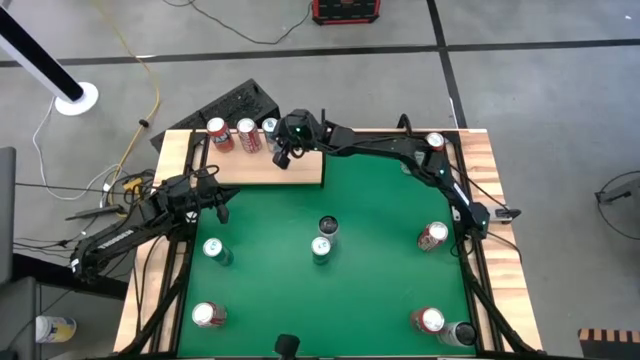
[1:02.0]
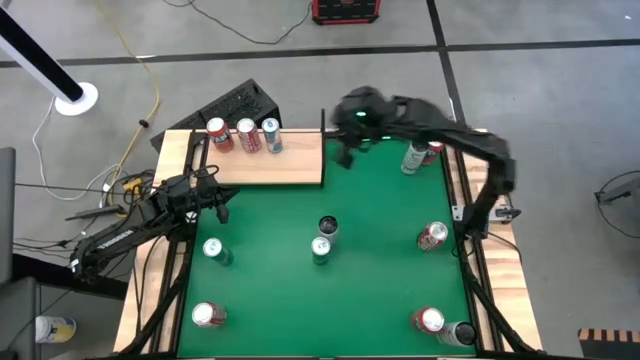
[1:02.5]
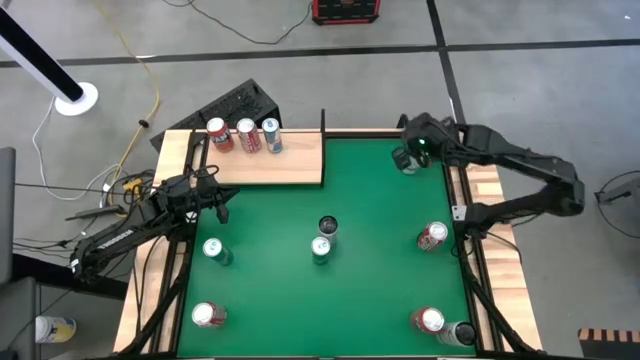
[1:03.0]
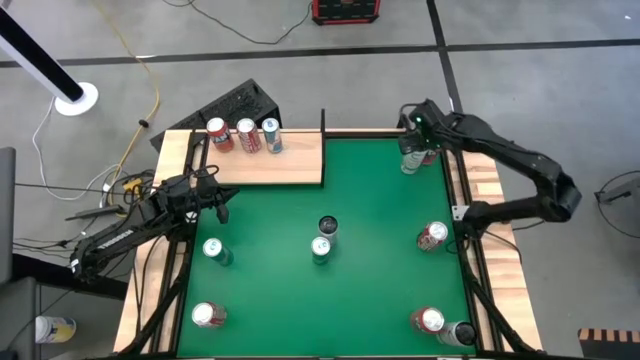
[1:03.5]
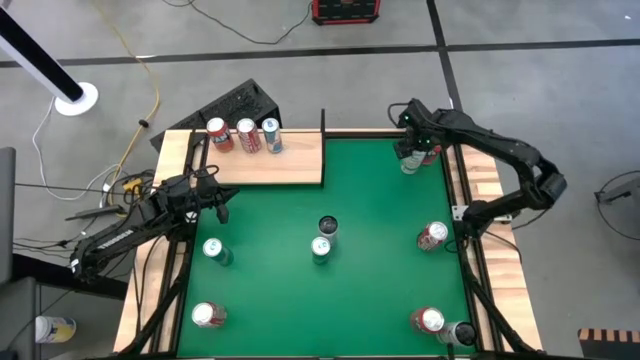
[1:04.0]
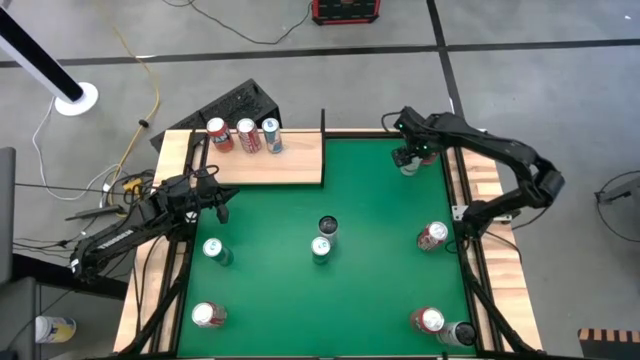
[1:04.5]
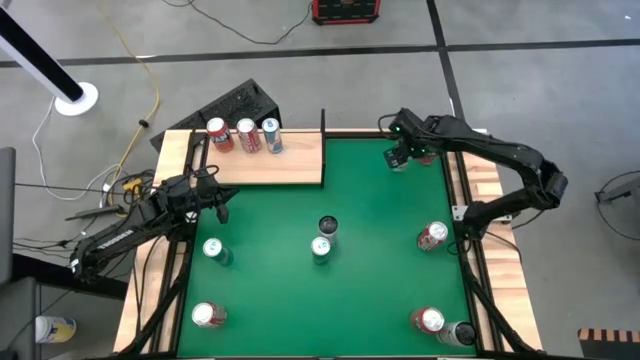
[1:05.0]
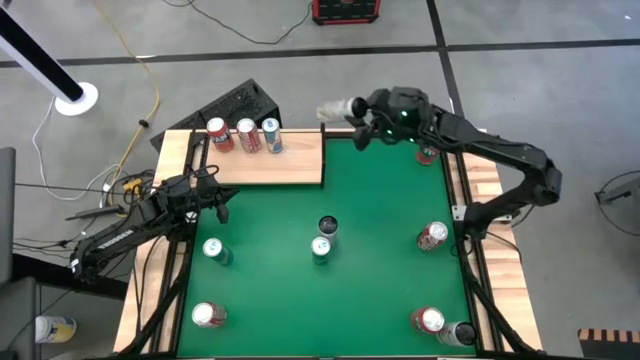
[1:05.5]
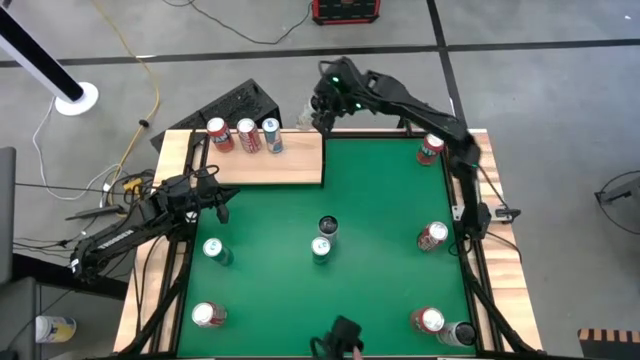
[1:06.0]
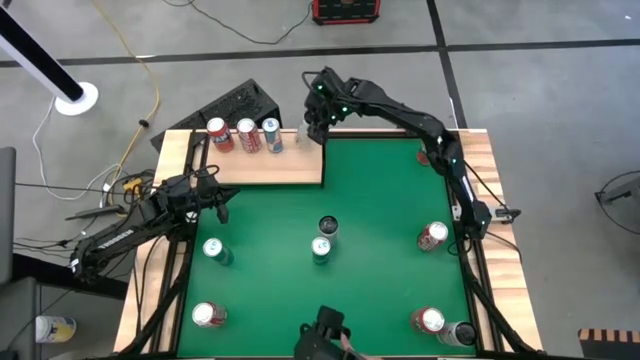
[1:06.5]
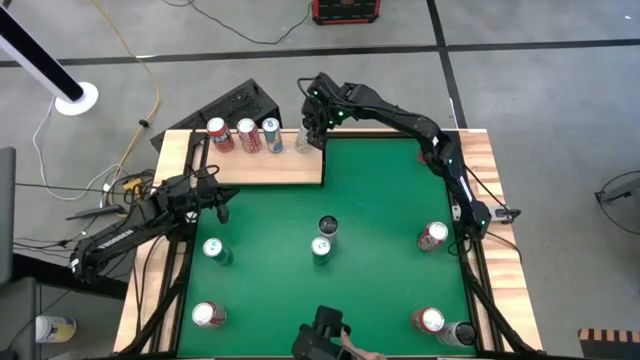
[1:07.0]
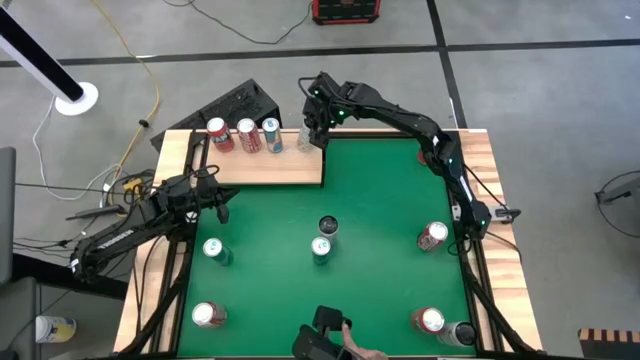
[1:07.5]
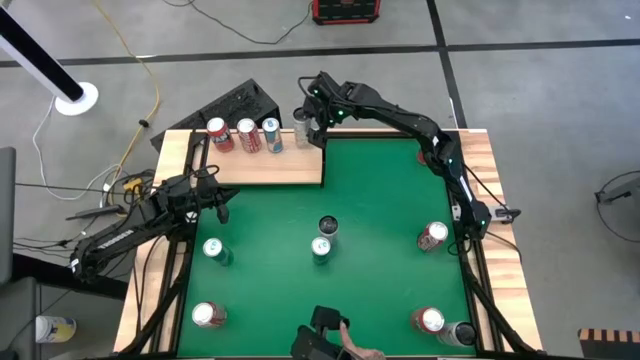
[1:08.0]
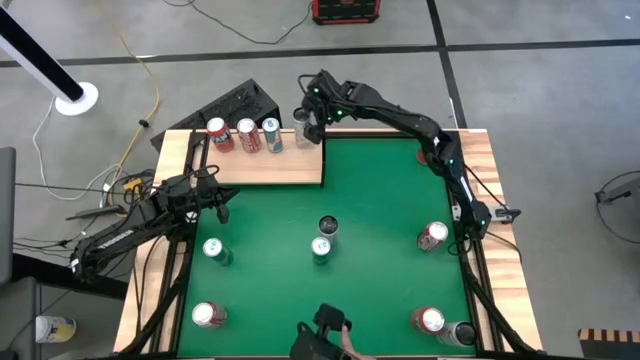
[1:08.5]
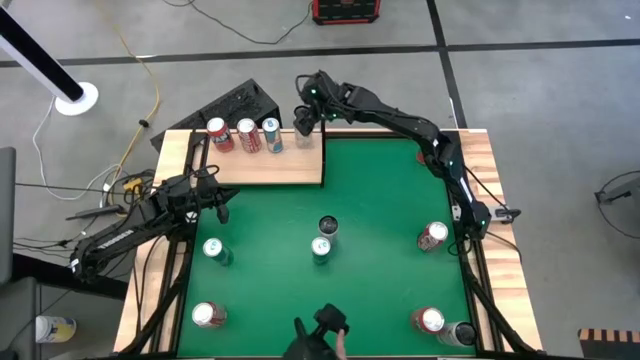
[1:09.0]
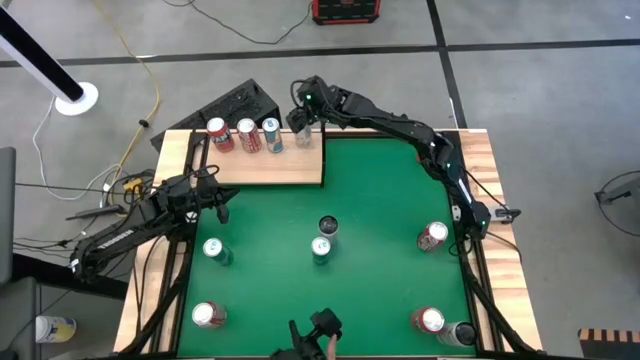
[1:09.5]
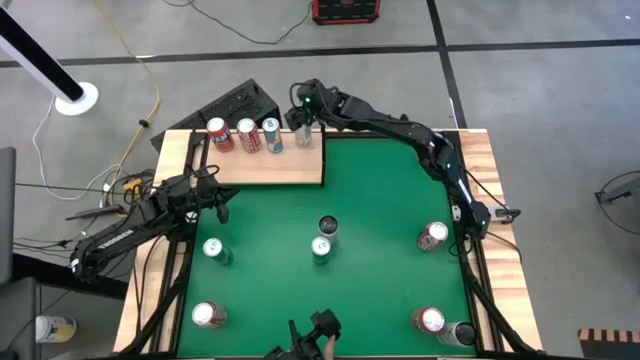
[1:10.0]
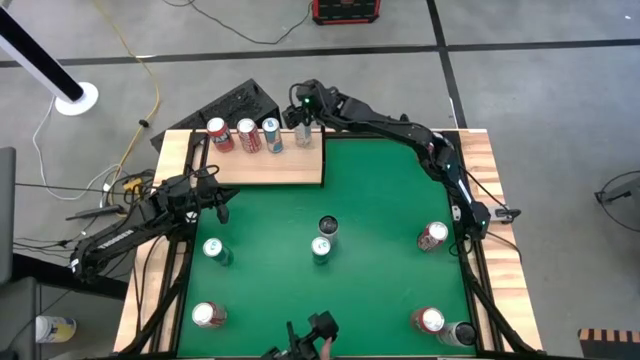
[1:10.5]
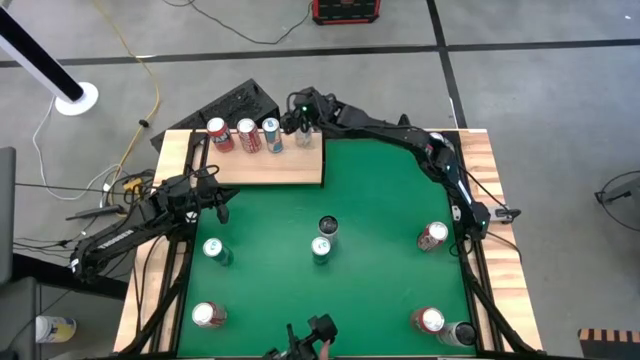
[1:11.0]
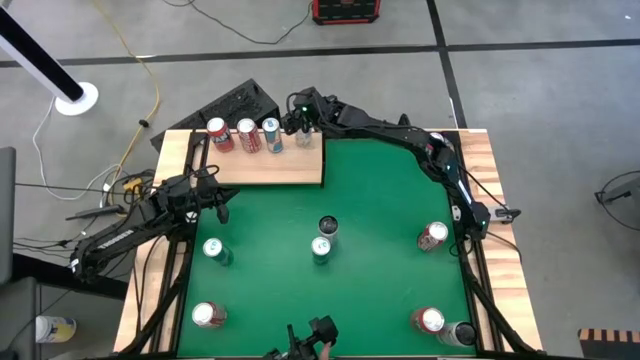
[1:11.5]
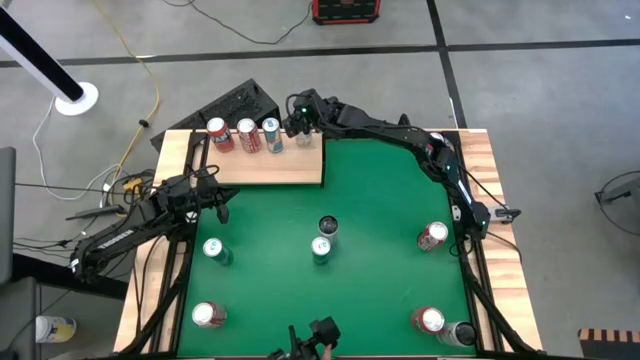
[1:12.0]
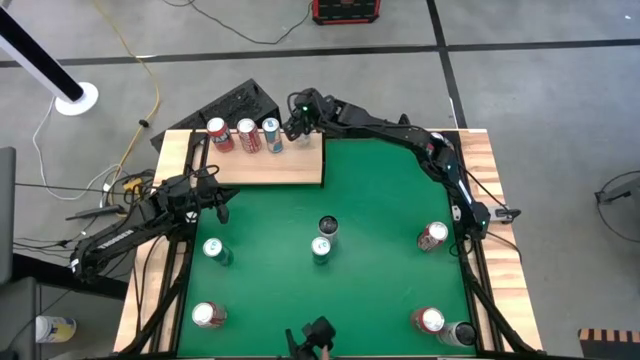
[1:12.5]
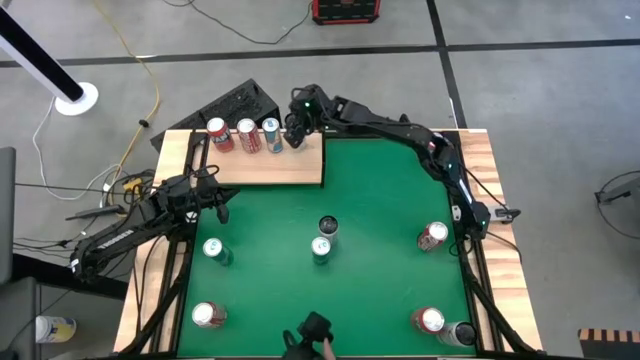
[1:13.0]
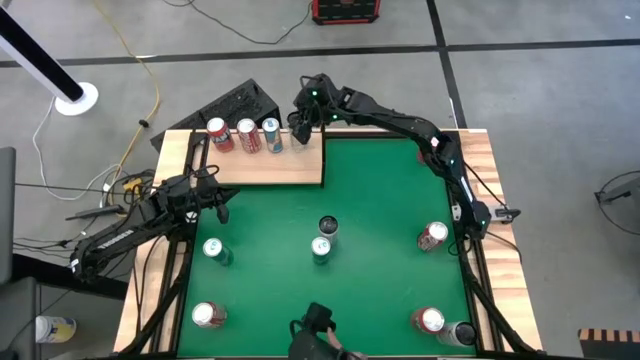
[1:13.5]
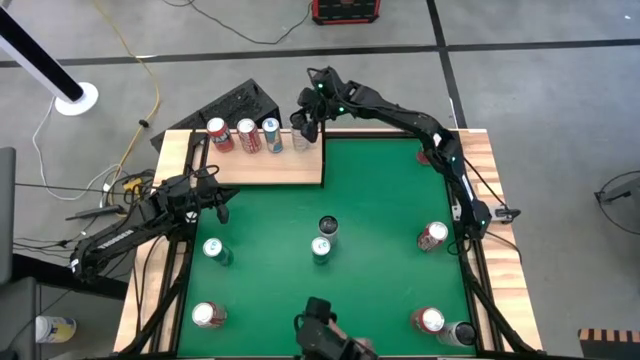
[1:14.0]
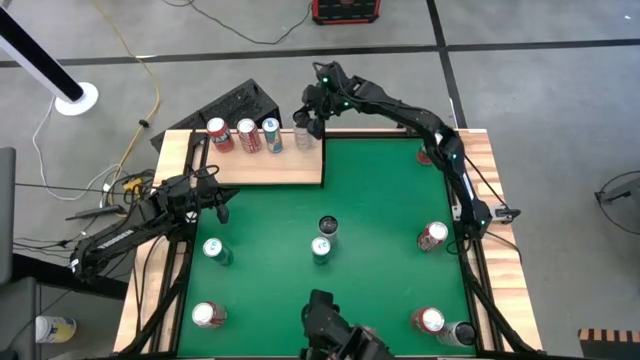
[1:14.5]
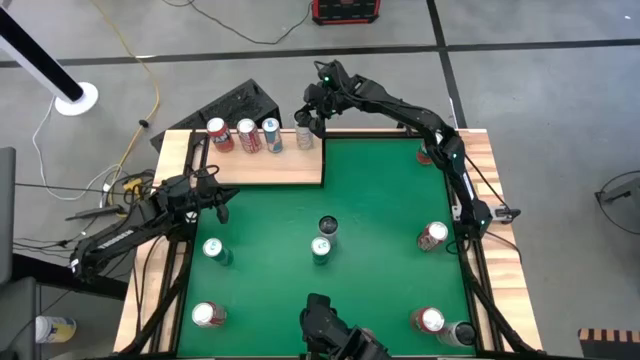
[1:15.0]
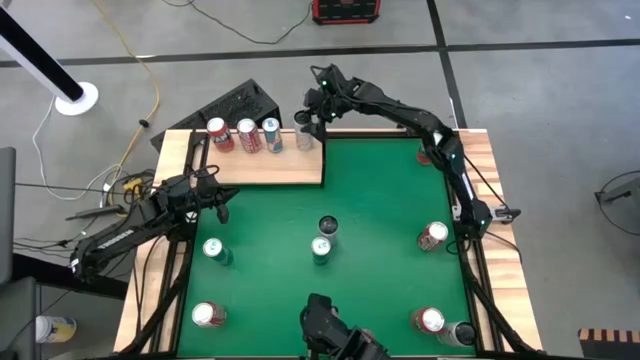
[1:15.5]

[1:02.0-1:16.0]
Task: Place canned beverage on shelf
Put the top white and yellow soda can on the shelf

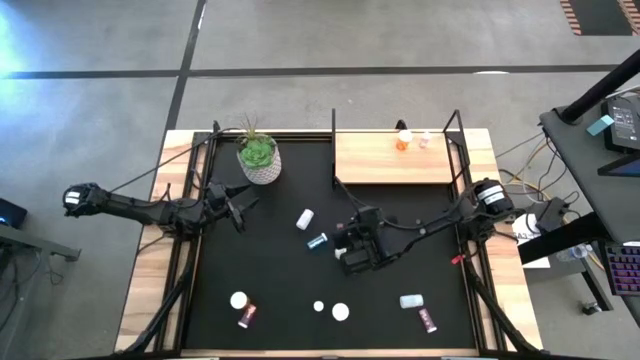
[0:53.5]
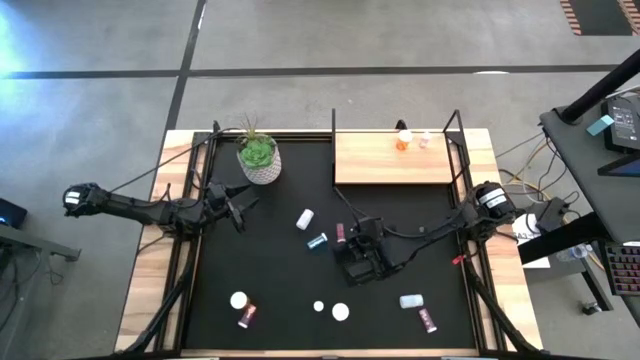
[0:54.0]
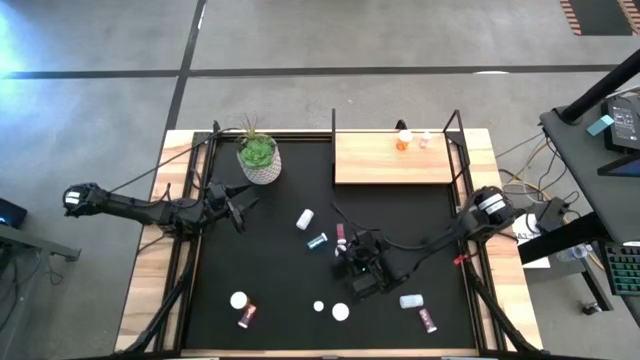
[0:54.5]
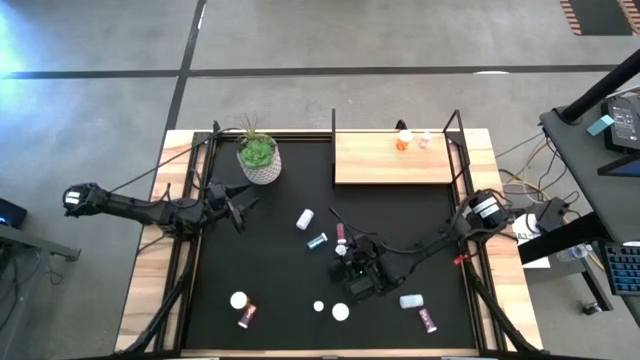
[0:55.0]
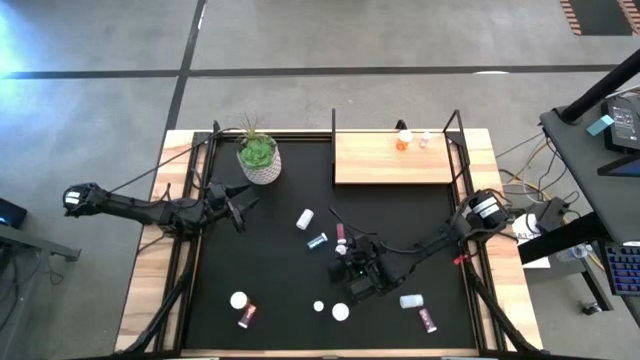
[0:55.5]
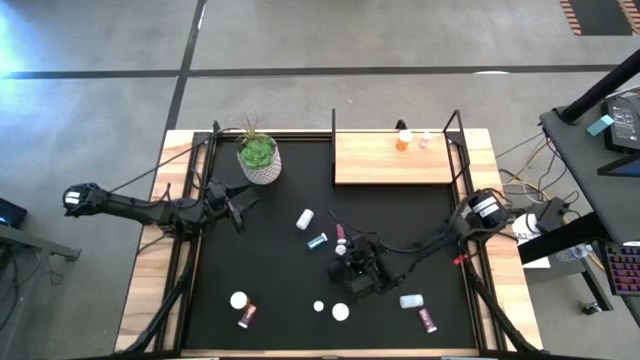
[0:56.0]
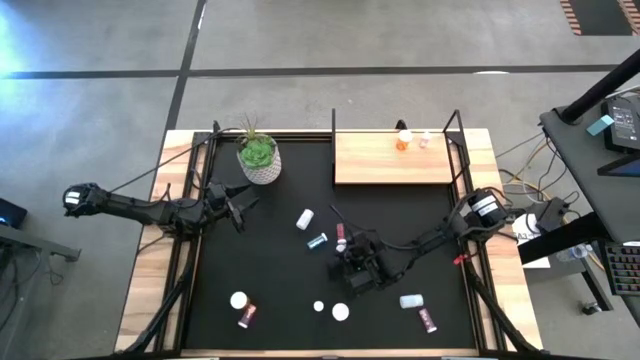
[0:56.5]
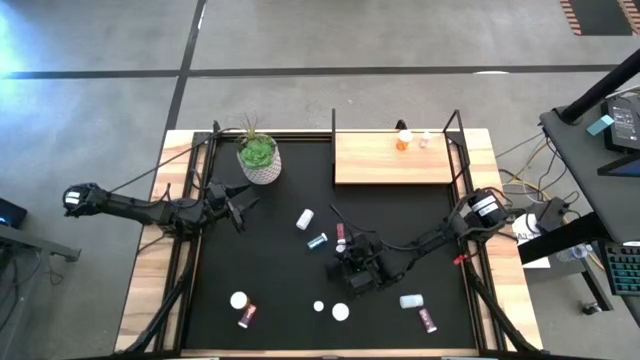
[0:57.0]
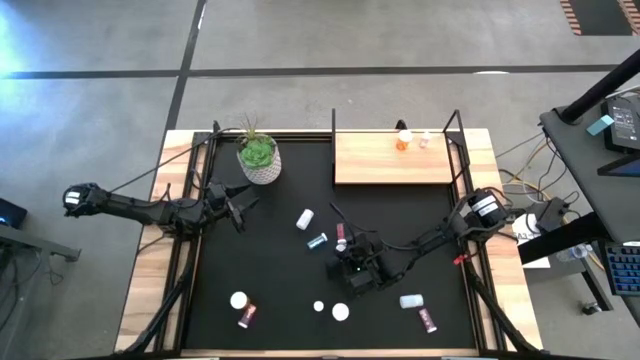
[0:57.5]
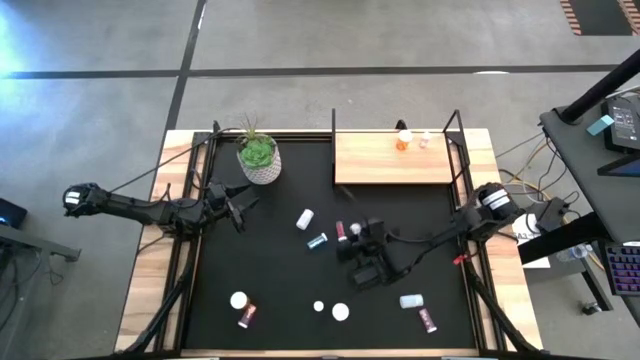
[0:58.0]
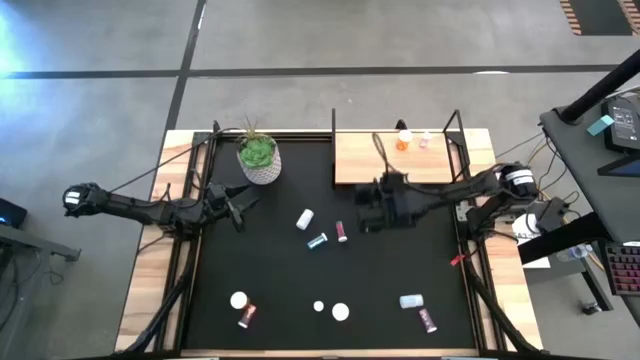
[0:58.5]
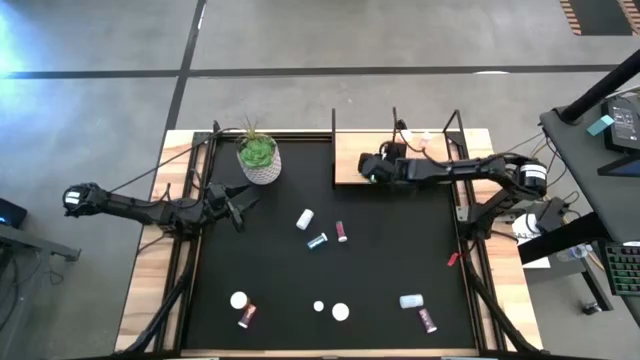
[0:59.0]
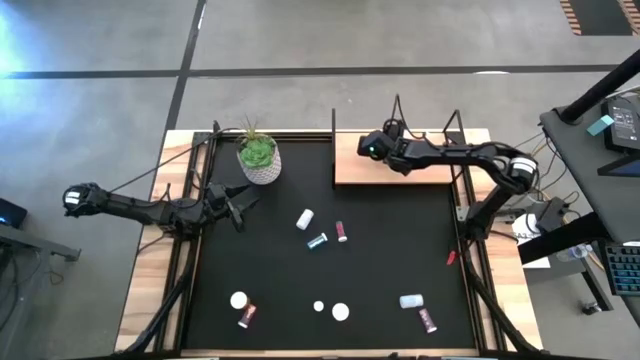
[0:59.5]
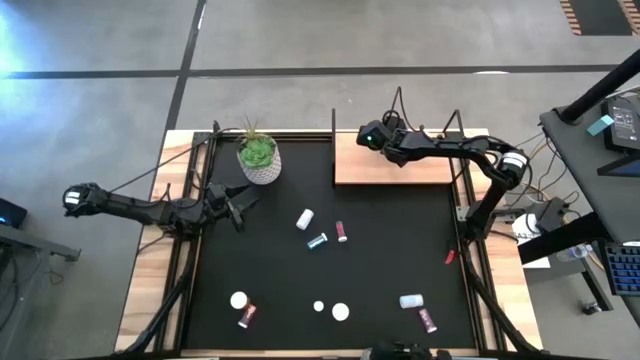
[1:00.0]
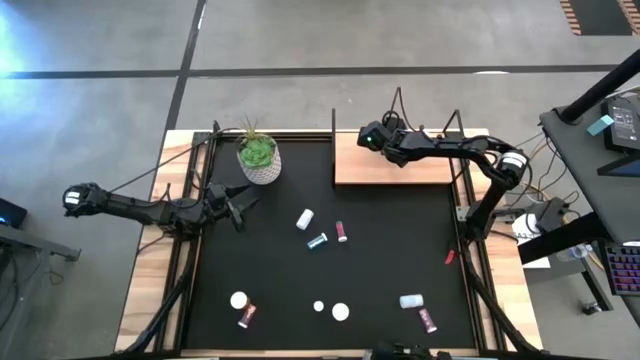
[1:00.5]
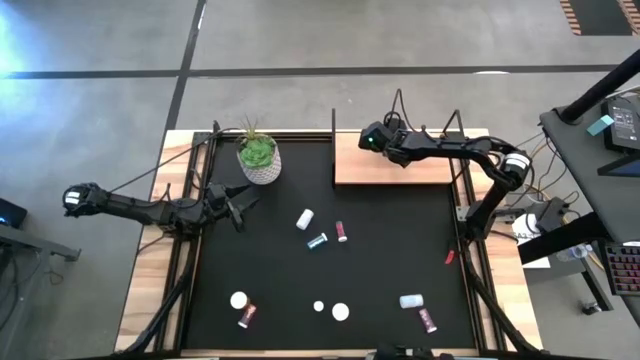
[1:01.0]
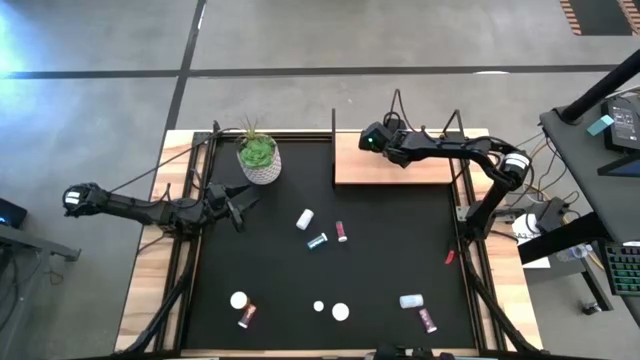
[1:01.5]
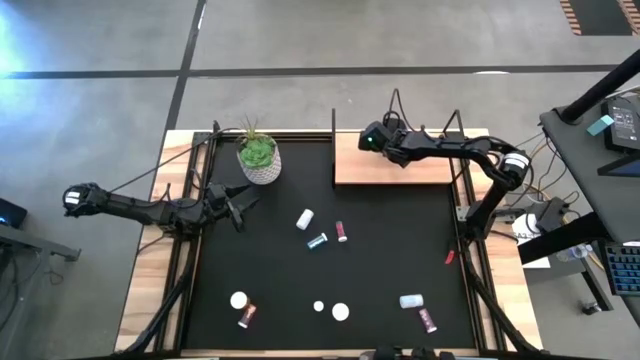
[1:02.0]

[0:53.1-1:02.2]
Task: Pick and place medicine bottles onto shelf by color
Put the middle white pill bottle on the shelf
